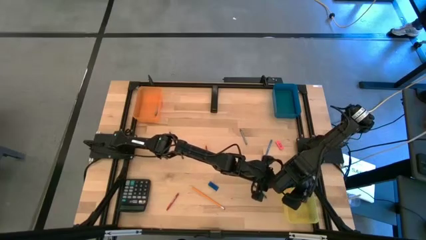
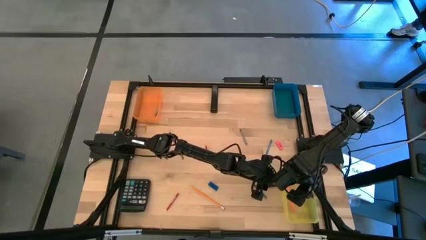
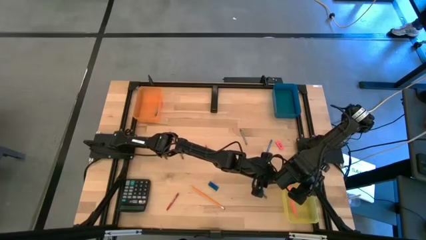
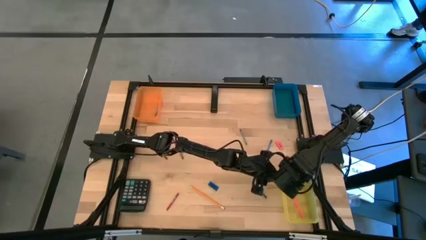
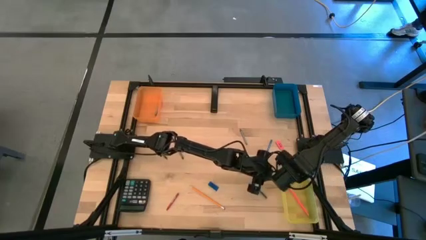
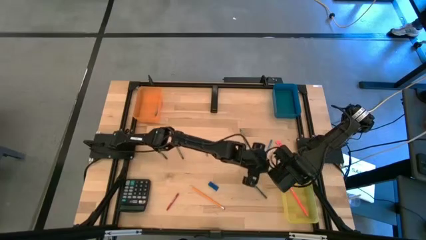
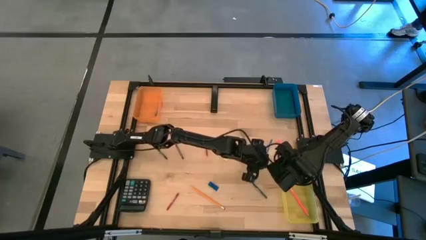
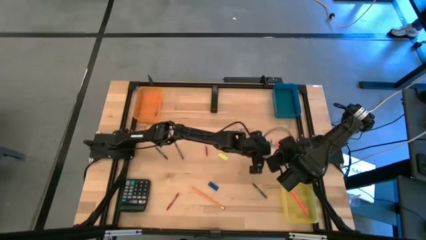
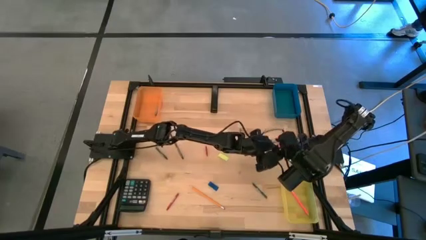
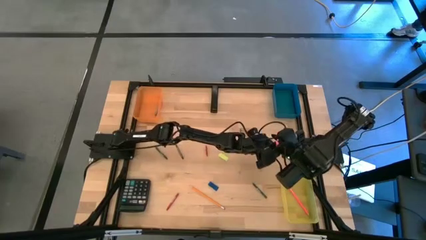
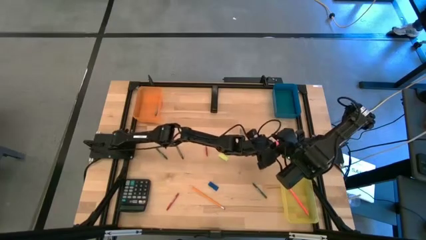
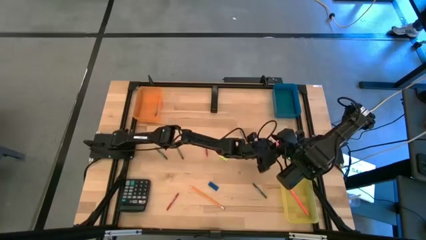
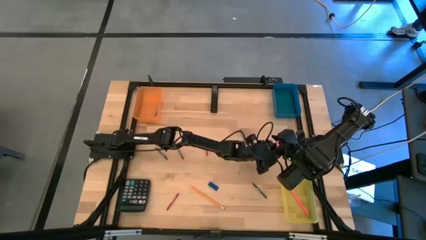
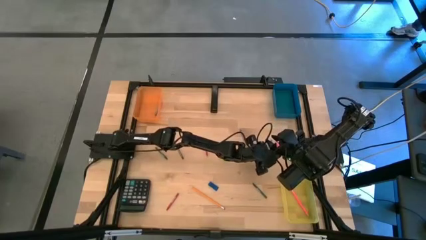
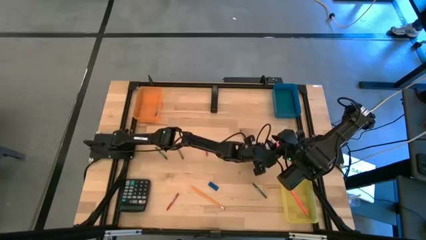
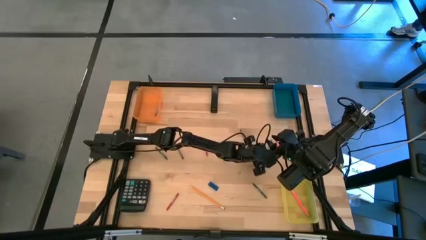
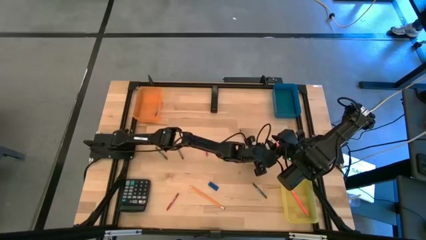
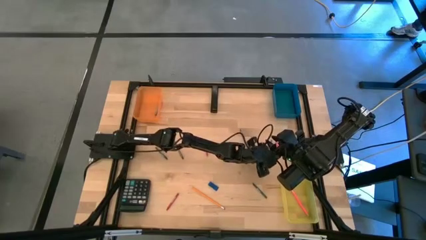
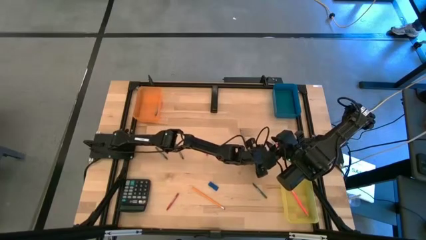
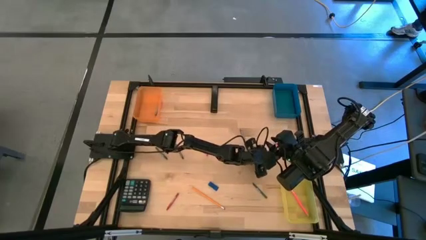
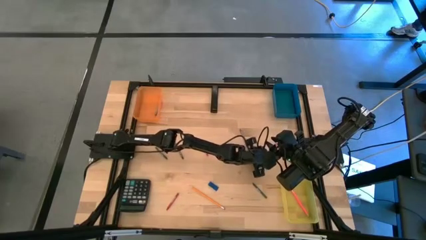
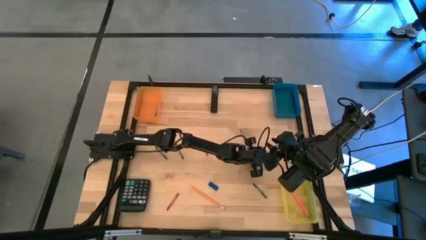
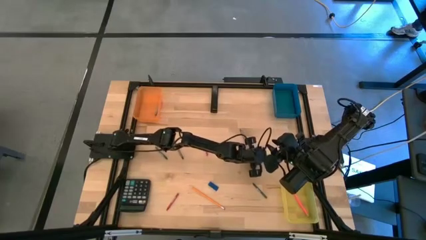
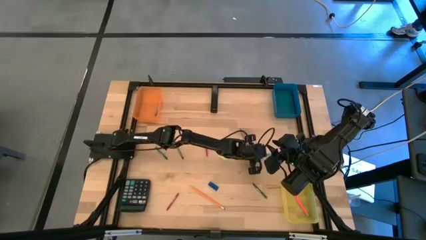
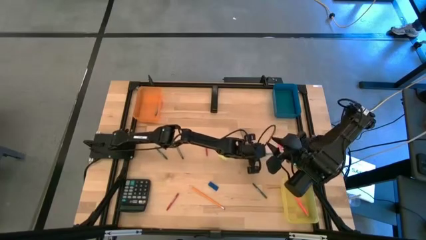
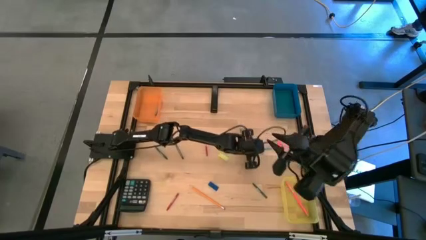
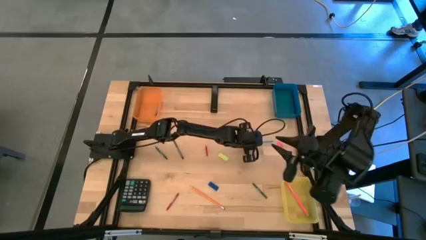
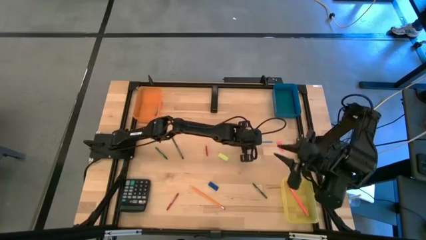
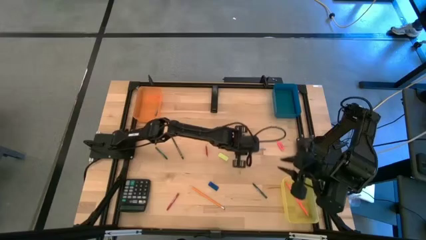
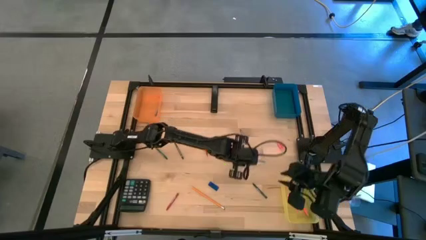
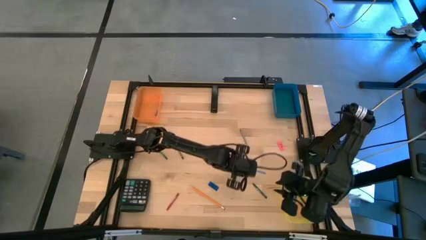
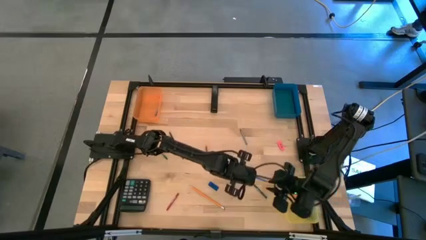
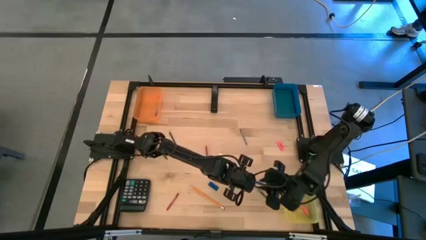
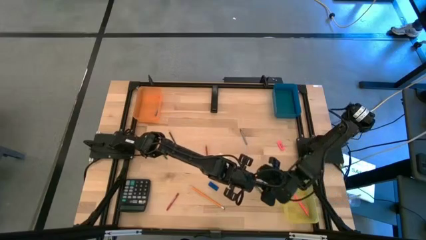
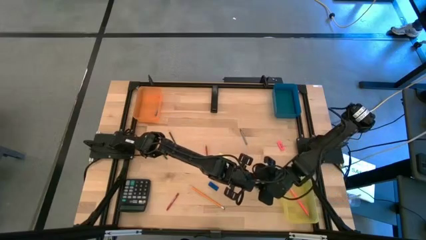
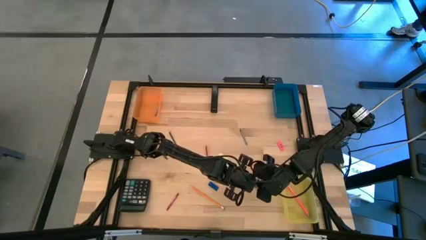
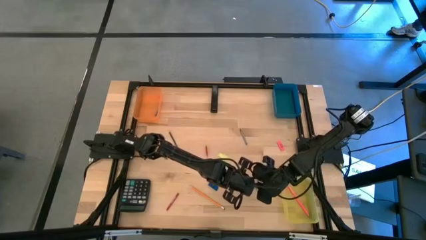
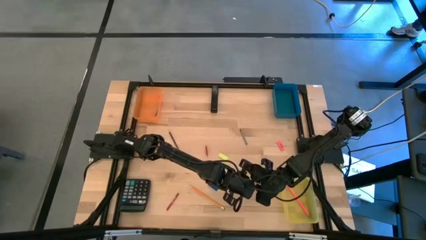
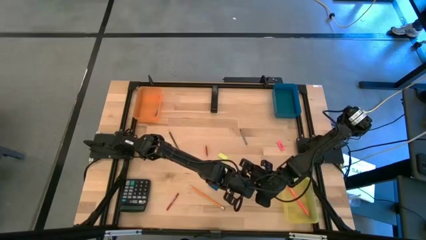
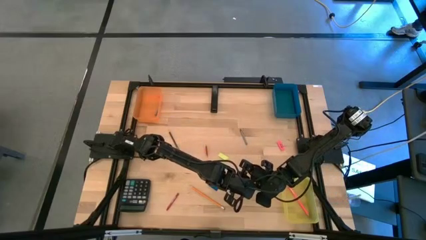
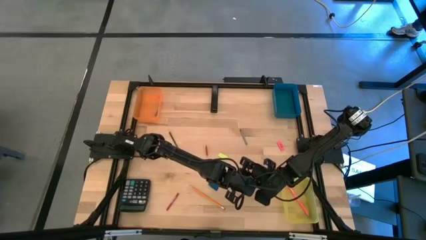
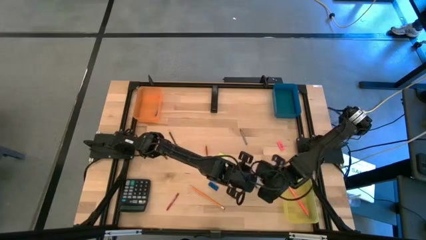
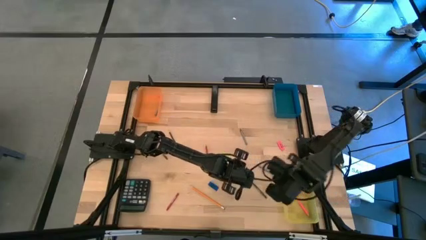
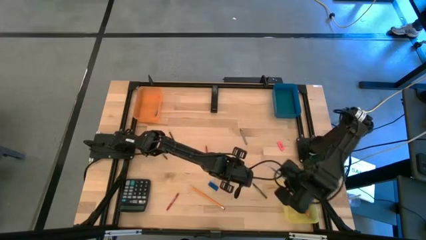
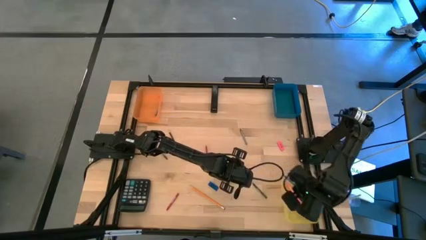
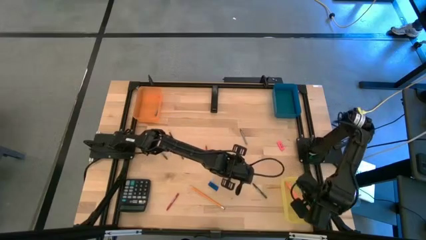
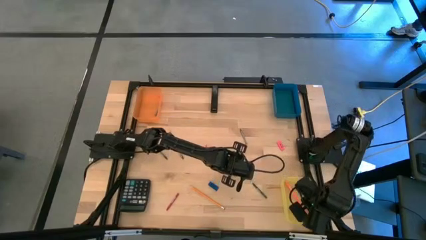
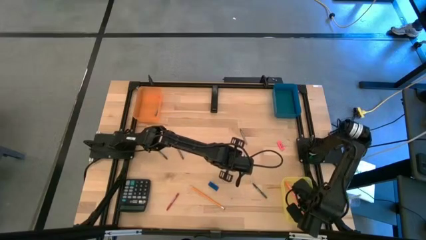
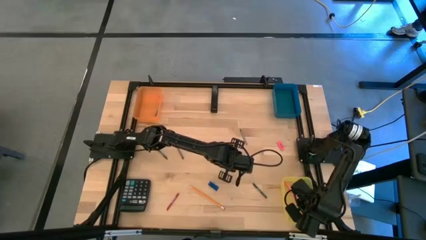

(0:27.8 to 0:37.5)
Task: Sort crayons/erasers/pens/pencils in bins
Put the blue pencil into the yellow bin

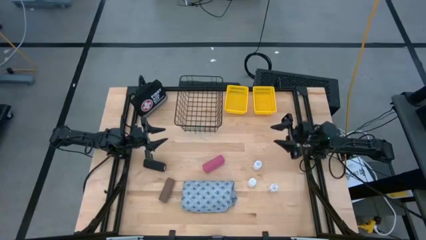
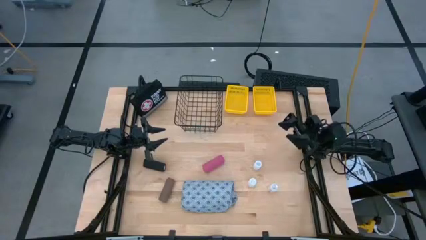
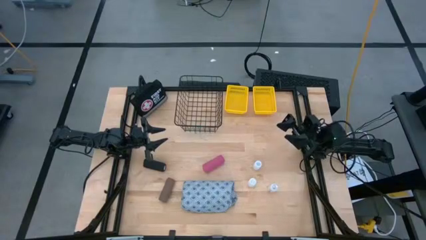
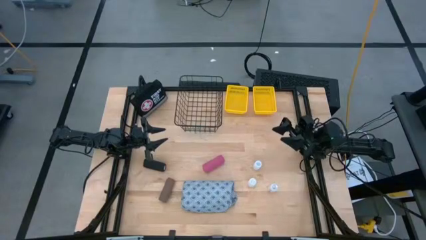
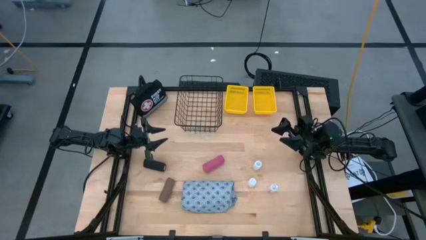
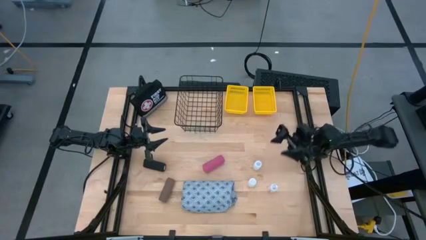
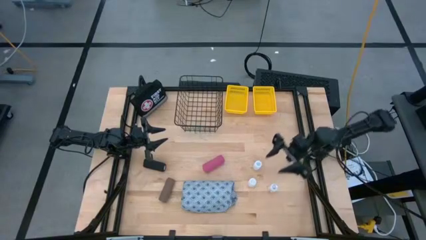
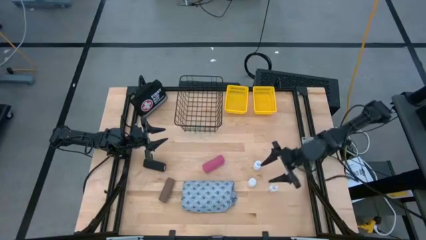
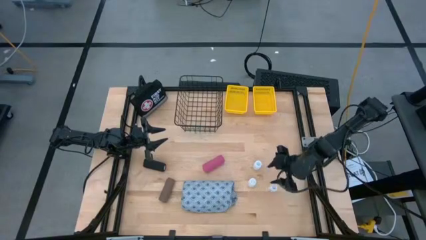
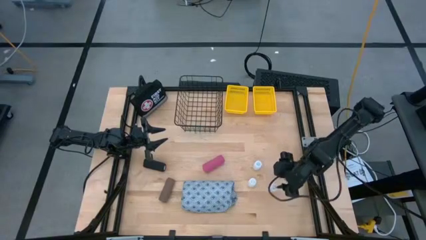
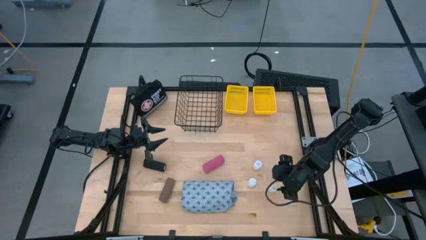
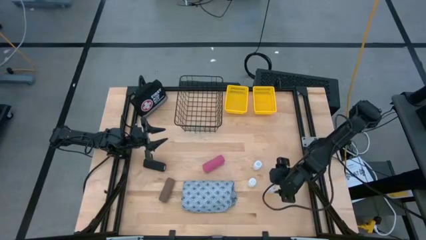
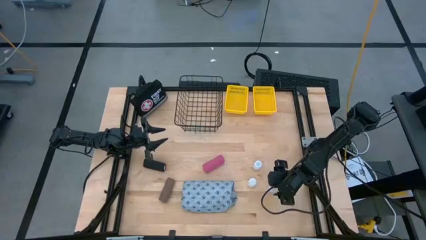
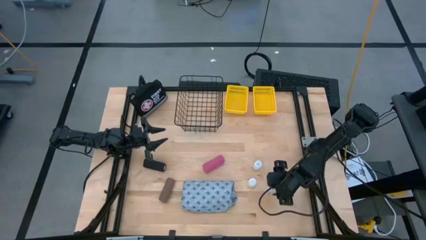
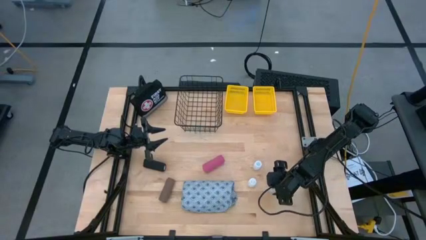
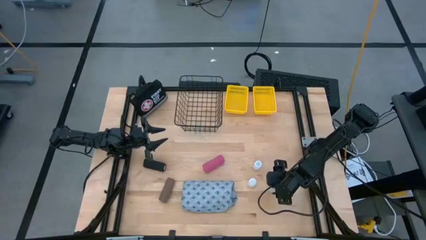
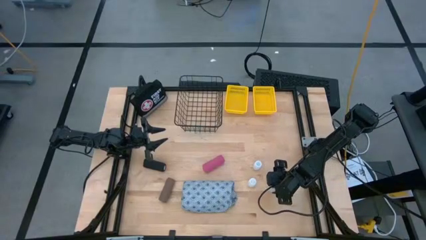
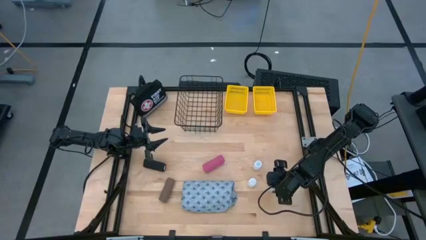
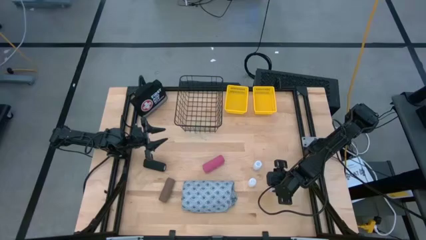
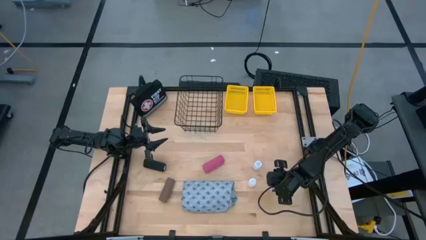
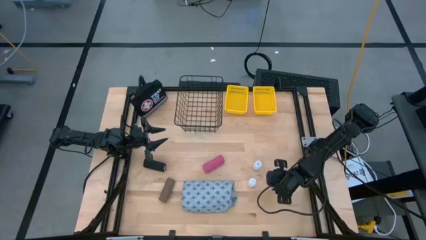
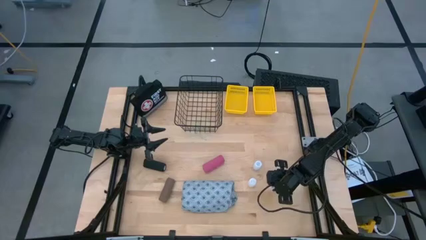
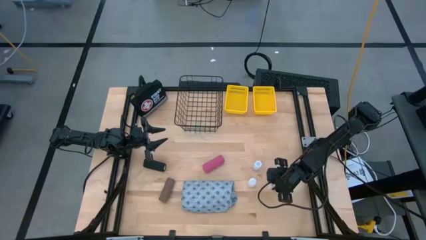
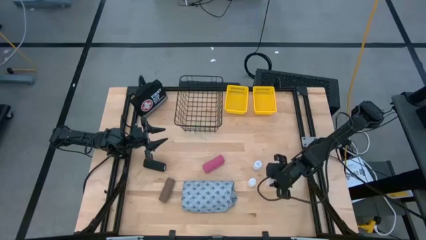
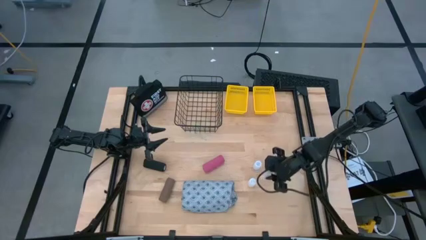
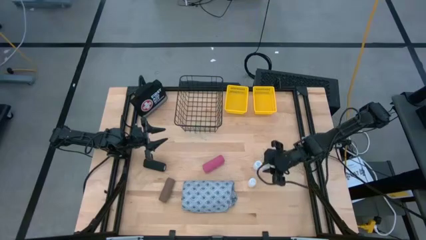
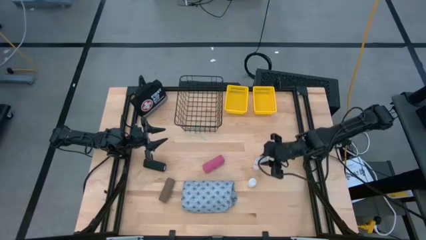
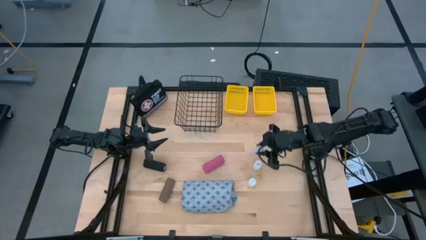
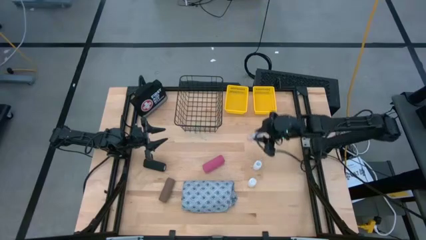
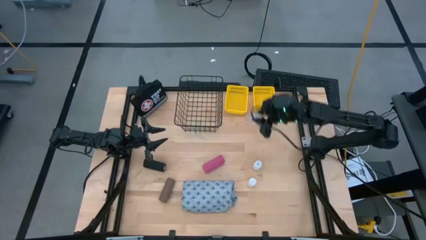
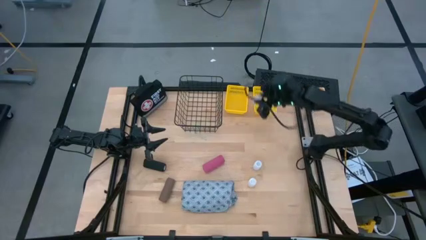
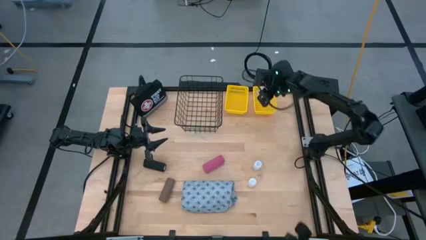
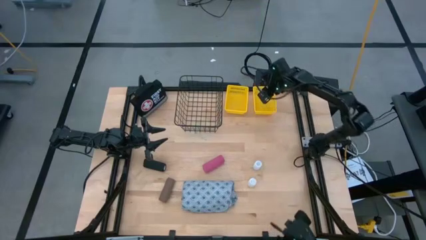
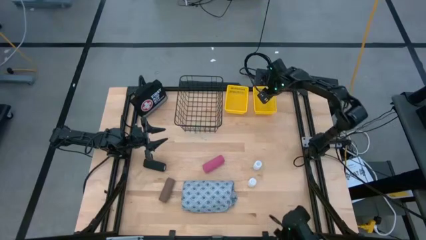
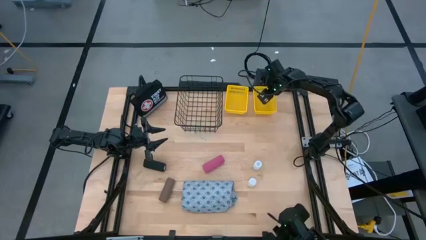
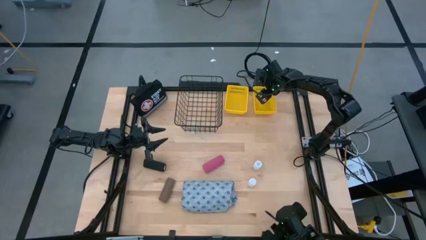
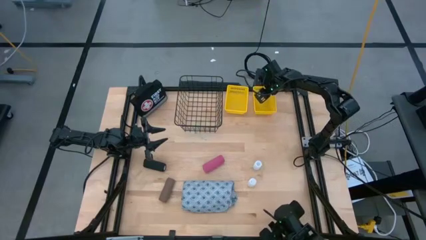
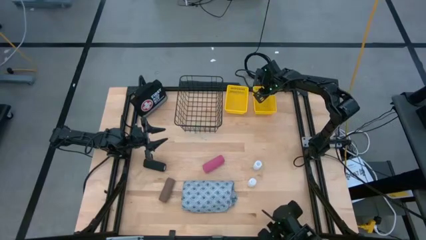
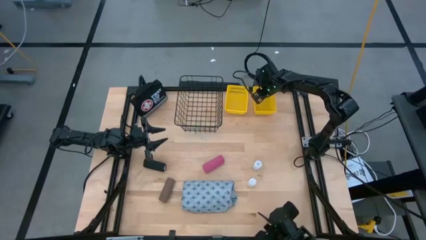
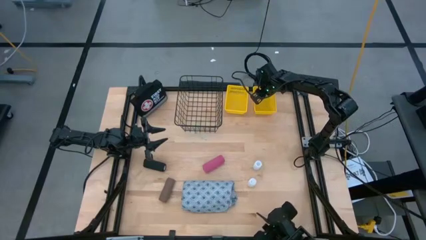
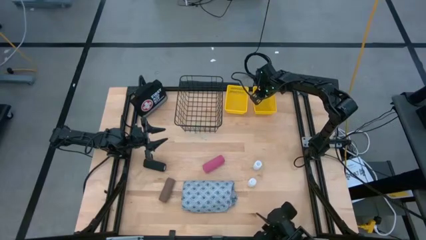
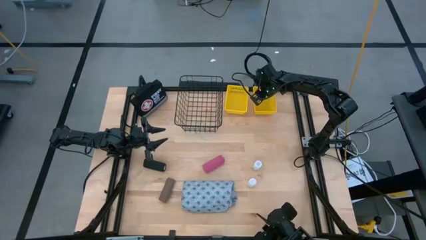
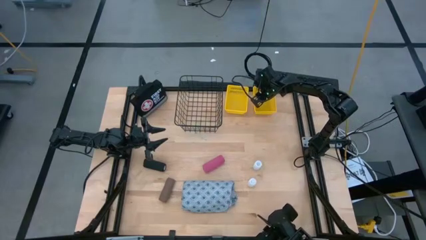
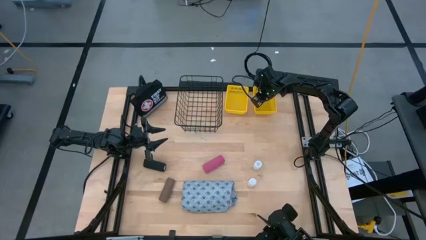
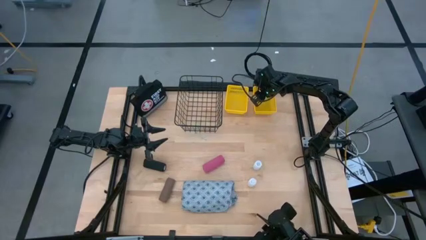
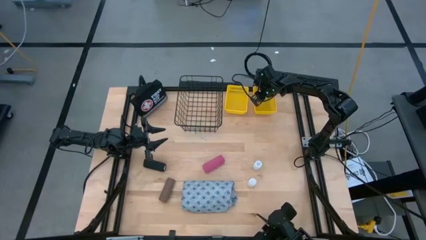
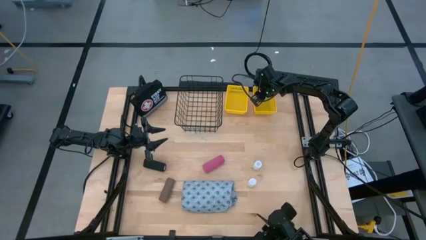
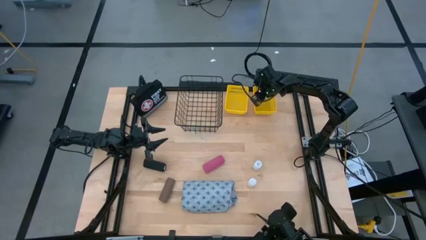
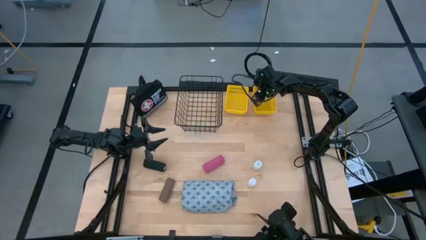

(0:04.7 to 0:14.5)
Task: Pick & Place Medicine items
Put the bottom right white medicine bottle into the right yellow basket
